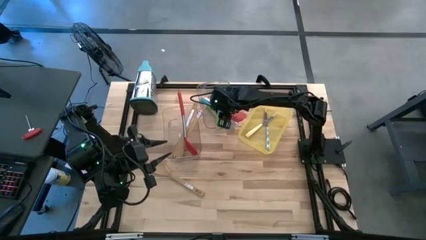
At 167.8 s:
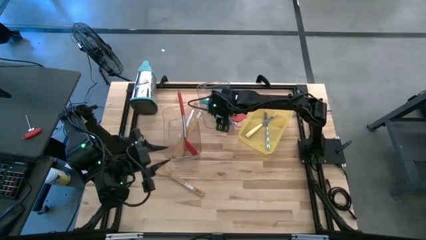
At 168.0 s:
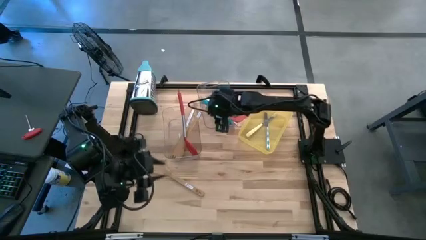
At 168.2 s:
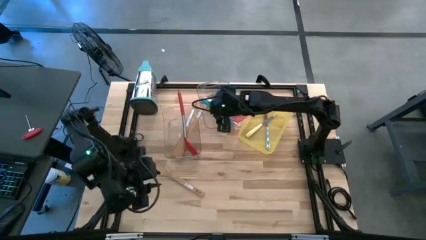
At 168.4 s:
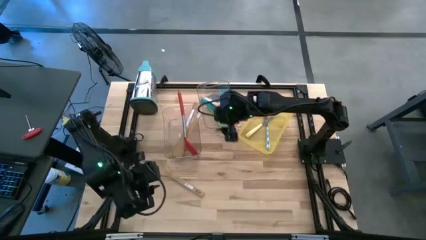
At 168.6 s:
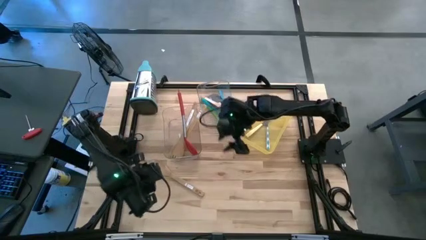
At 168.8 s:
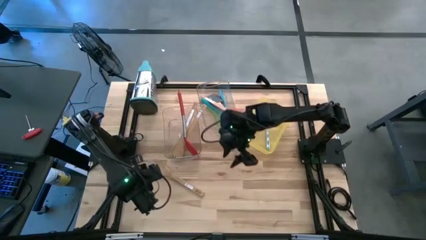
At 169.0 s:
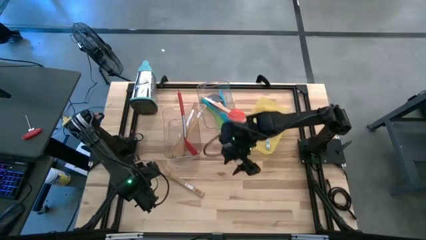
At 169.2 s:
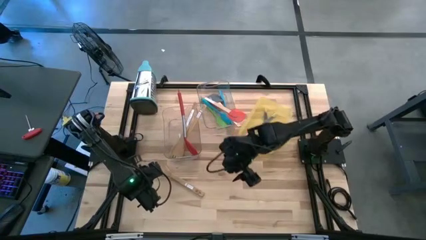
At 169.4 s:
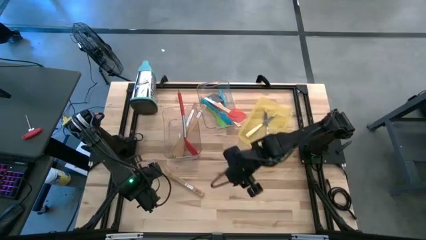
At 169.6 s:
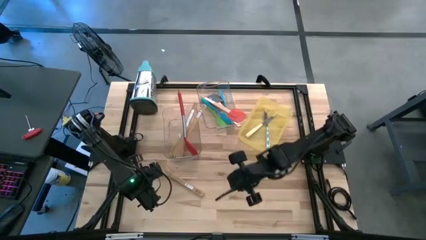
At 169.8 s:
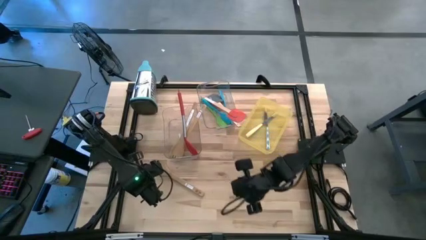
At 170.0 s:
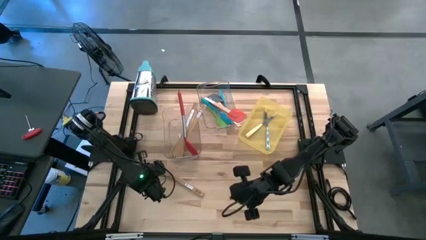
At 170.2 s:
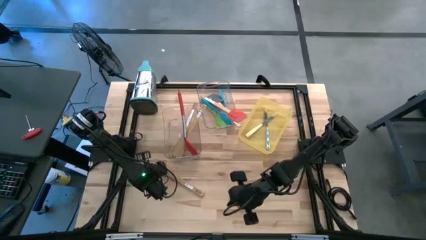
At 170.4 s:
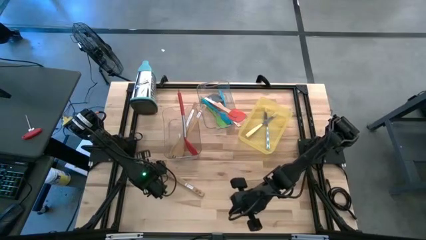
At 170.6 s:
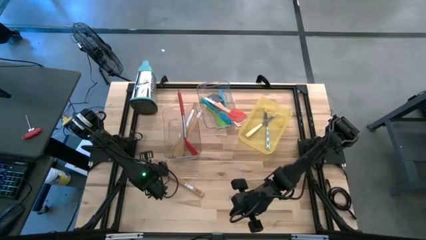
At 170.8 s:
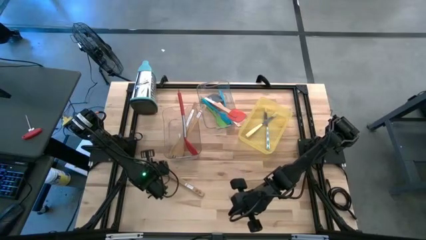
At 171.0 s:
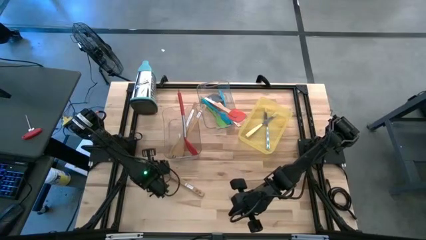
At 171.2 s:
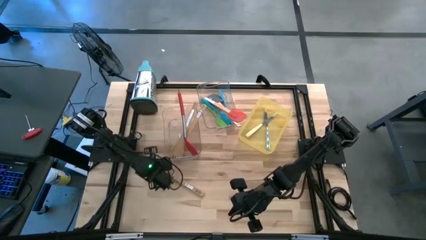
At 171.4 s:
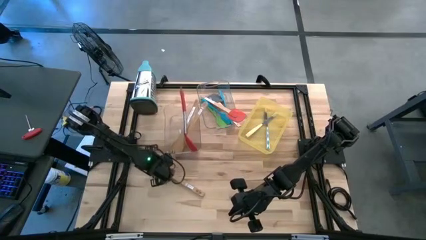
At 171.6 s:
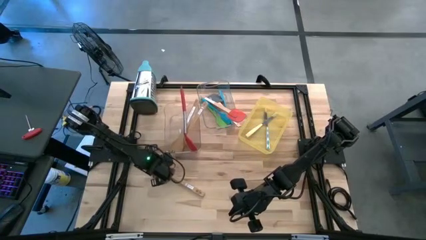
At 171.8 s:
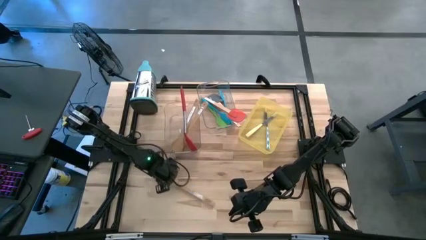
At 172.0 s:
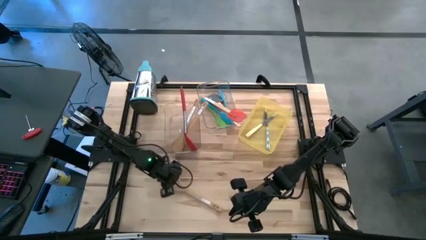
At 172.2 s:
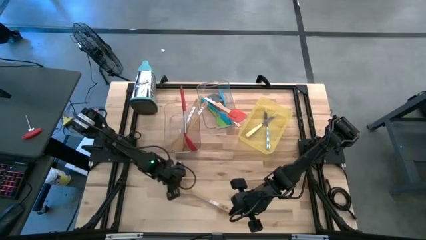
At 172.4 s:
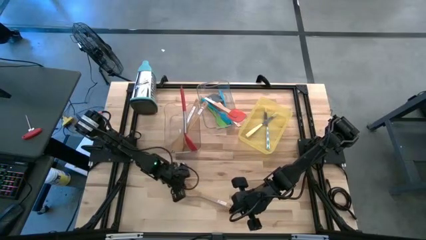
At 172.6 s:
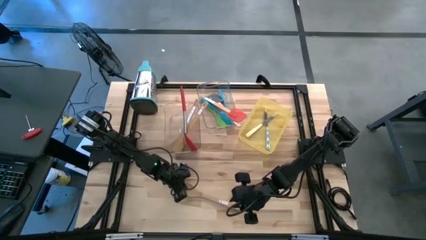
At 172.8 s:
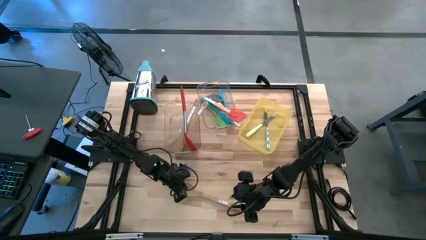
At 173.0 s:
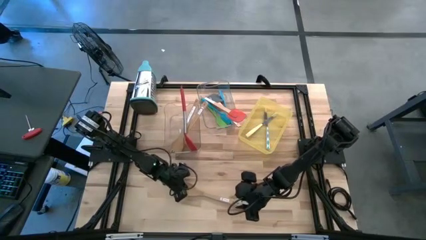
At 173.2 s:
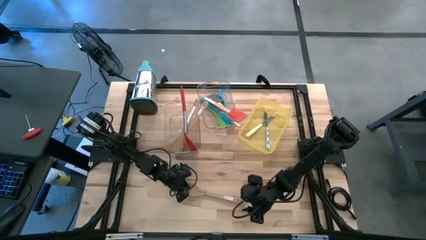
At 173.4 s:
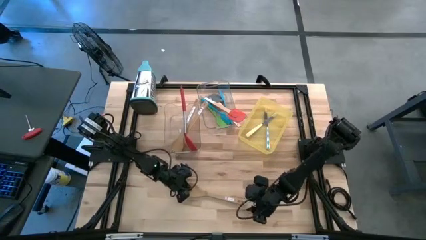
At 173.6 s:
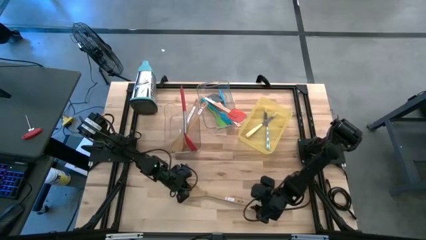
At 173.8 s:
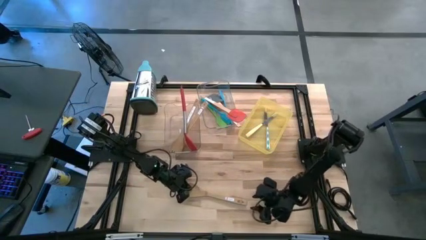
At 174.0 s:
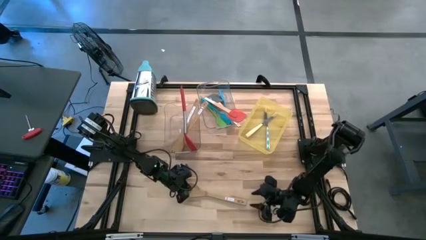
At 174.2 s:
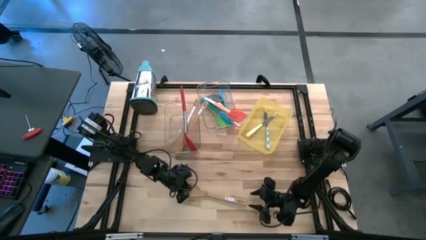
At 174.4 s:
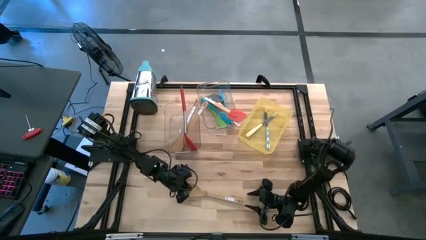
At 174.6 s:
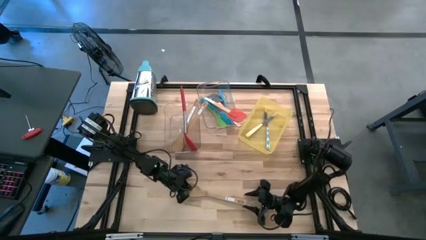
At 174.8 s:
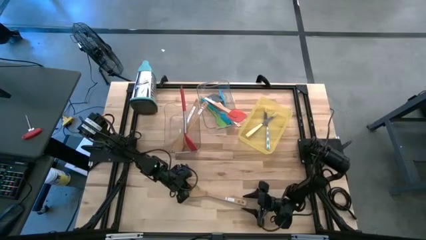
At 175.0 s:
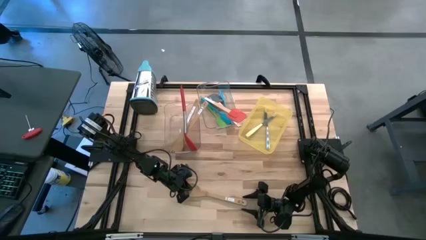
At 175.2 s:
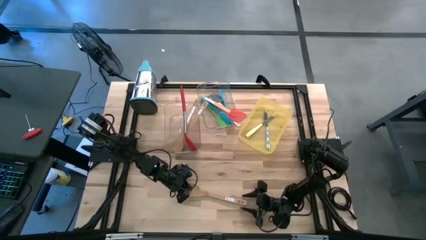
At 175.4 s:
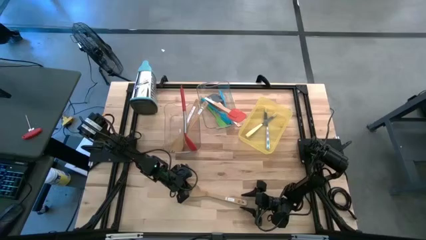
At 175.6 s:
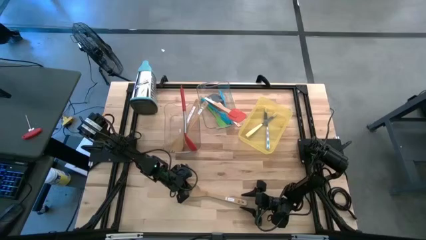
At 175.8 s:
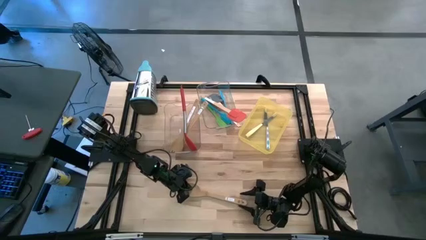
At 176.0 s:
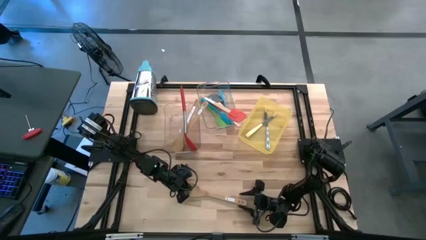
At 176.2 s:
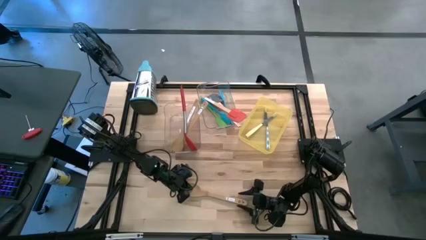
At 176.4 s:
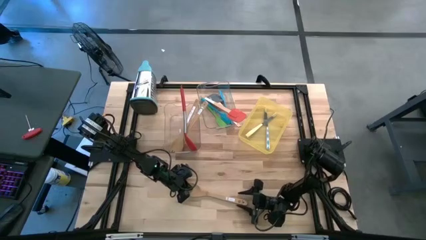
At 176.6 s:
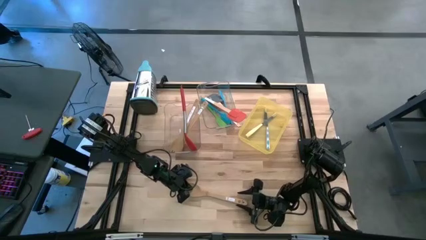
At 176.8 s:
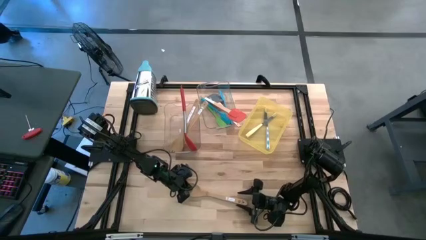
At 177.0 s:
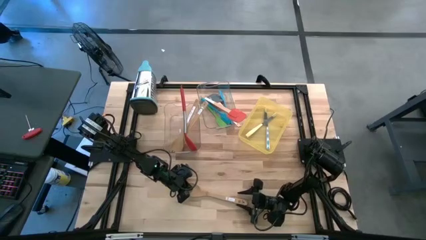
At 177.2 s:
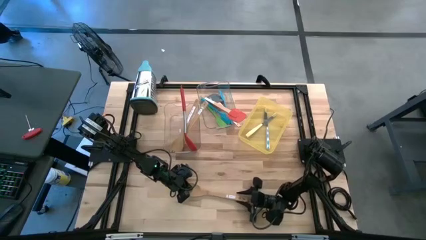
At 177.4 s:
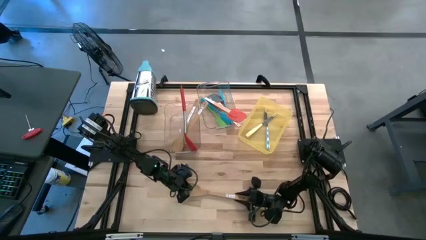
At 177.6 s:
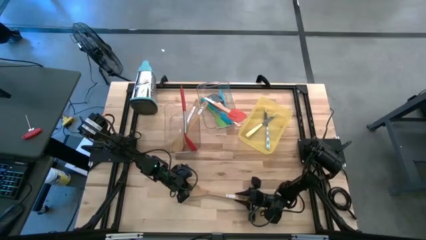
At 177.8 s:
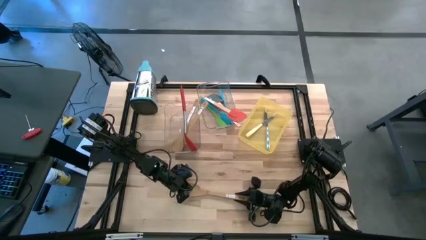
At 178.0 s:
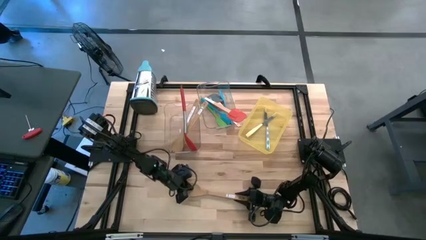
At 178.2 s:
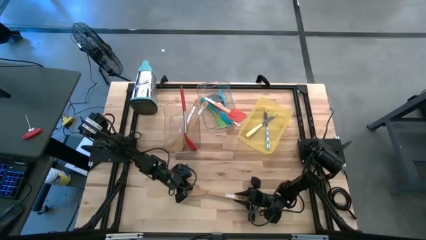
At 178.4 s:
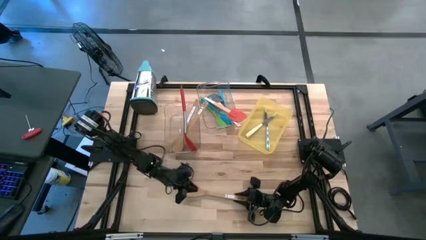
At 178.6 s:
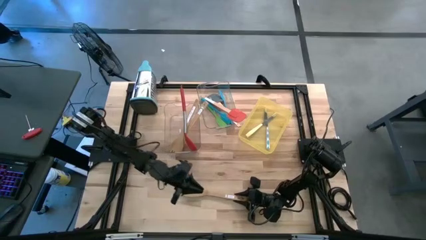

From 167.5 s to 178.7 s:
Task: Pick & Place Kitchen Items
Put the wooden spoon into the top left transparent bin

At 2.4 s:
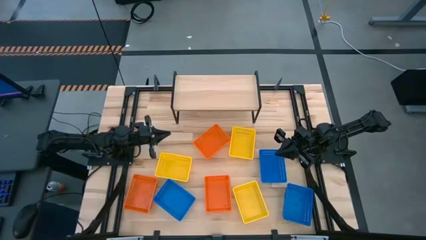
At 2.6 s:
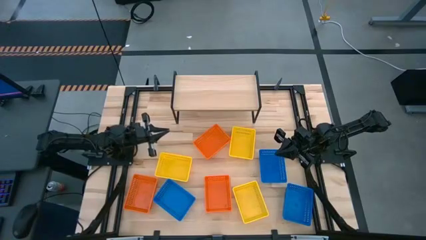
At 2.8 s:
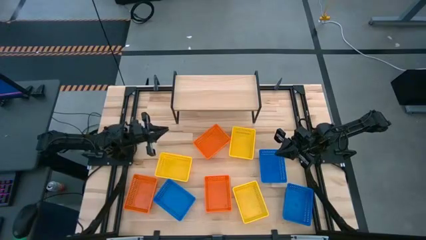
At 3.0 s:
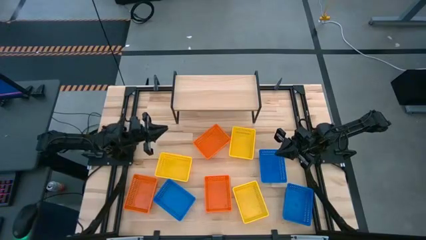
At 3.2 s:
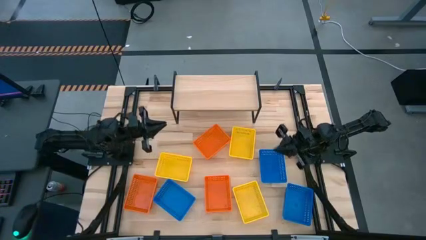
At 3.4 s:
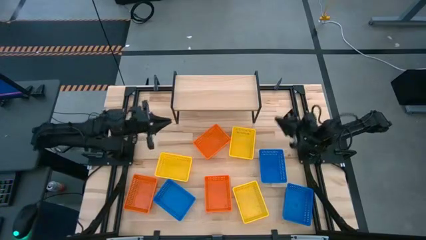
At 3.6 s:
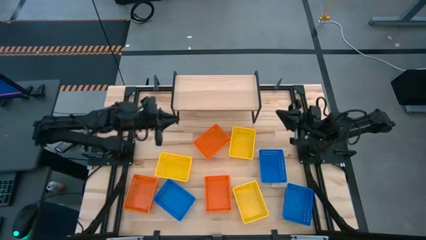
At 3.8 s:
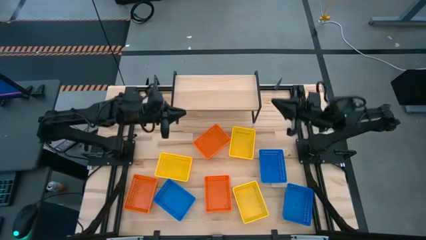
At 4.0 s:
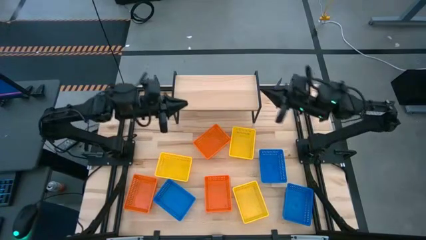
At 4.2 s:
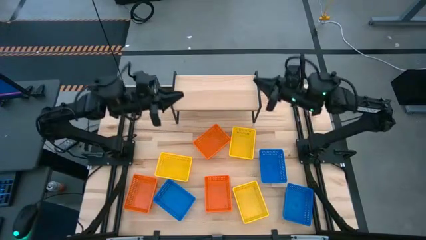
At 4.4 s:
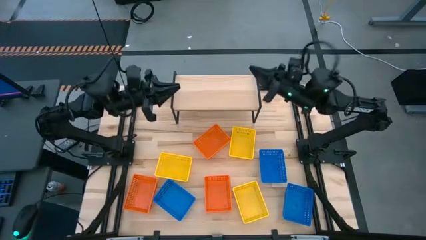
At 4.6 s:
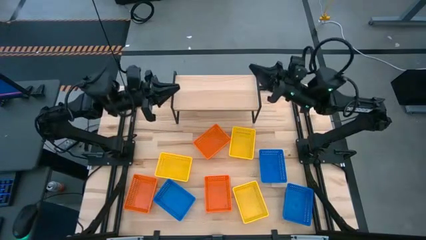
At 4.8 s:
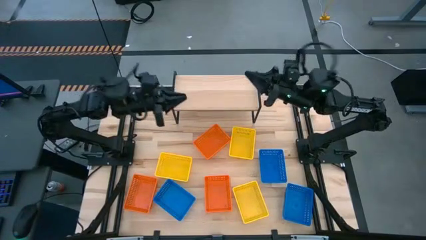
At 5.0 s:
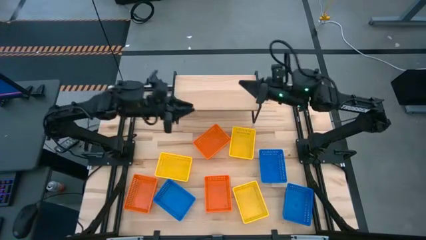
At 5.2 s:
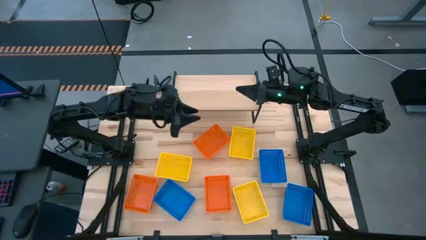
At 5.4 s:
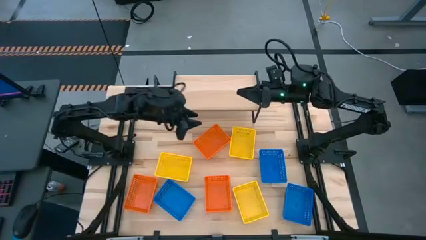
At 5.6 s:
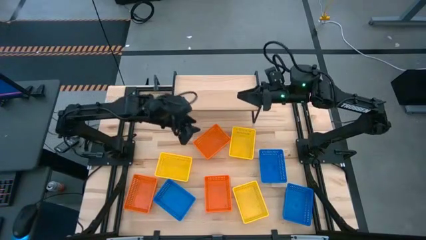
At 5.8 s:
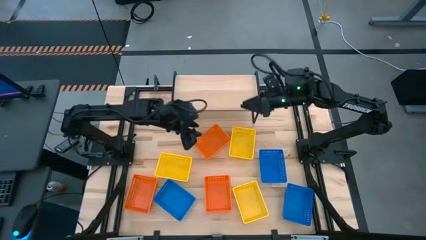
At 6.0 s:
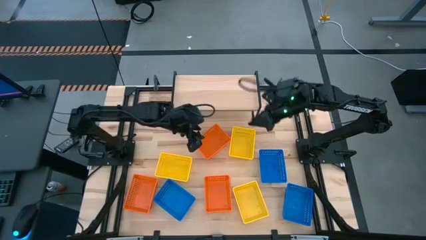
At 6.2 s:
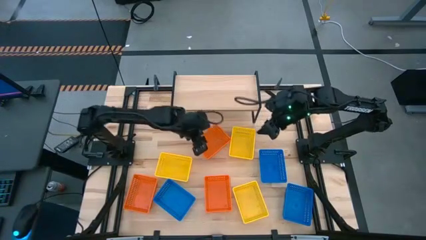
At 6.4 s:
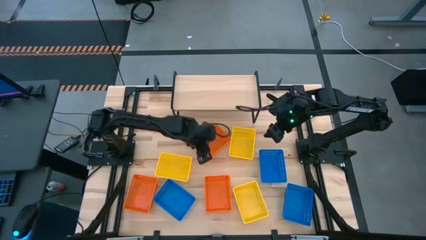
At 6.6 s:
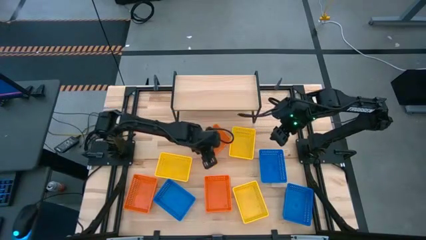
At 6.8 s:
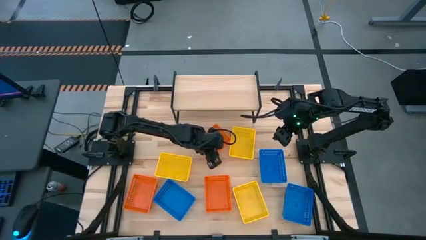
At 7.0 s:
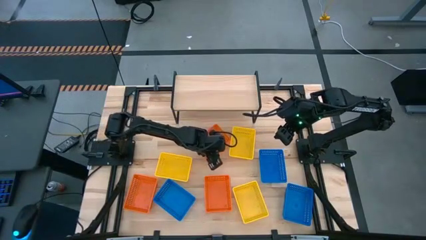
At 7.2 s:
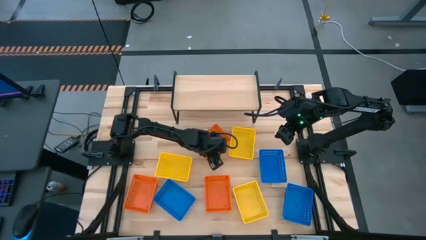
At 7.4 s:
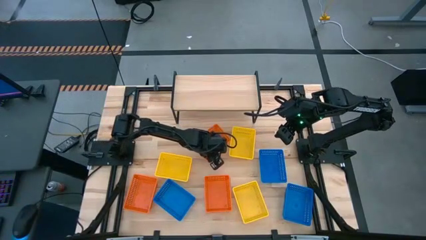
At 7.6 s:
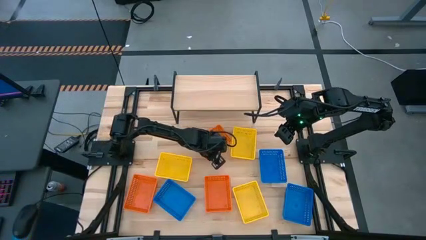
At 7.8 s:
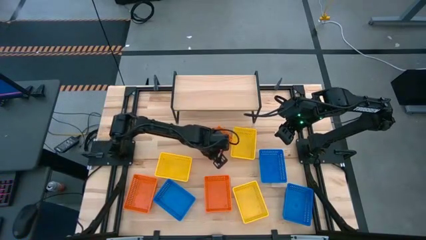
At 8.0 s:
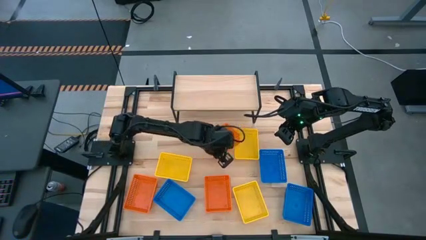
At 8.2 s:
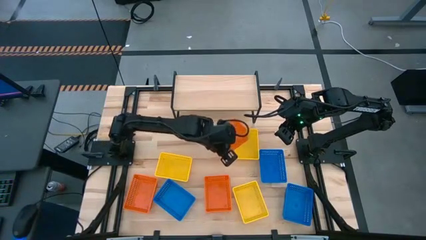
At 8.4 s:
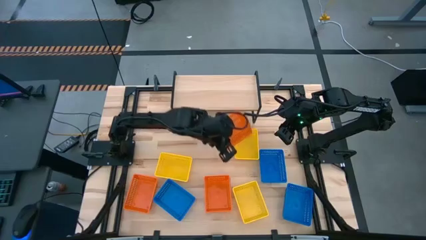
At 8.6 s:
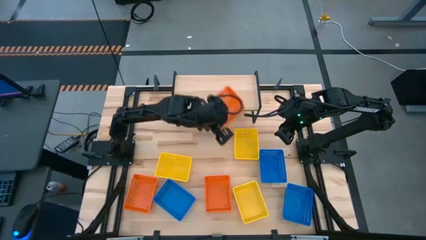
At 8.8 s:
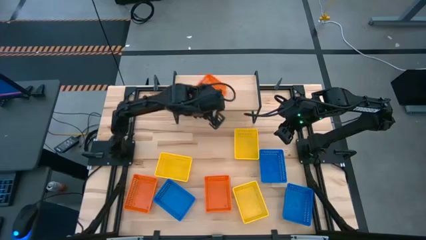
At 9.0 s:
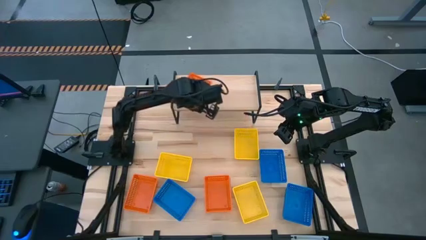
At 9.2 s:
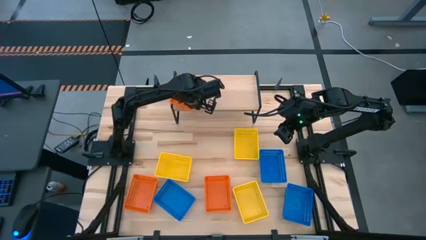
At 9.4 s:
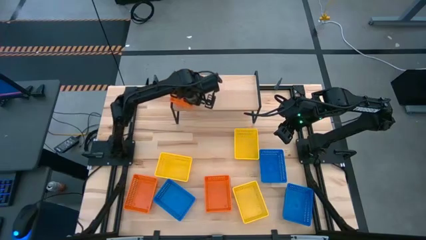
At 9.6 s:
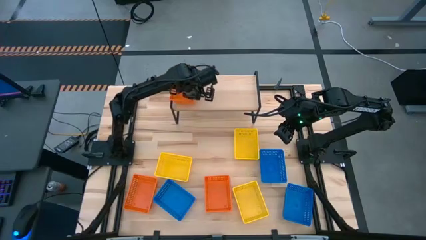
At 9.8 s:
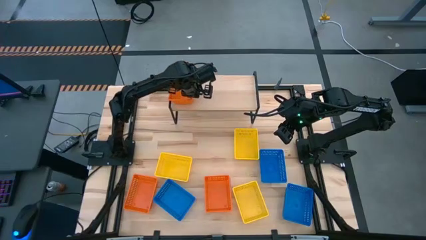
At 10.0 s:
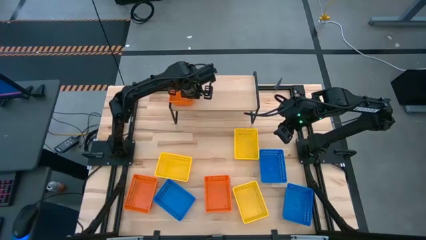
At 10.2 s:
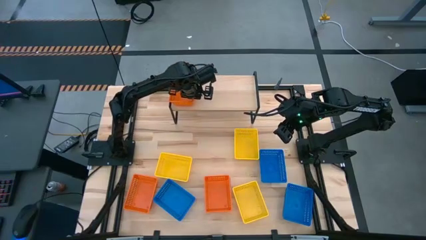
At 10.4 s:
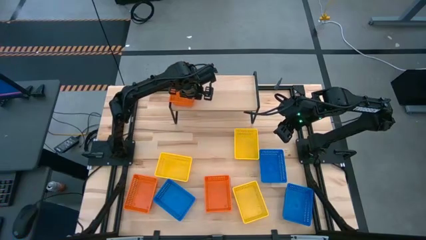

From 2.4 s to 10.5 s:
Task: Stack baskets on shelf by color
Put the top orange bin on the shelf
